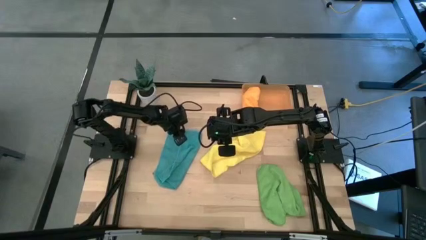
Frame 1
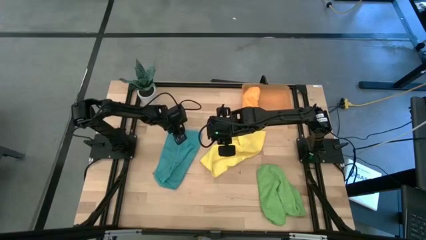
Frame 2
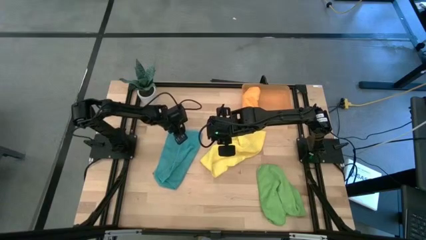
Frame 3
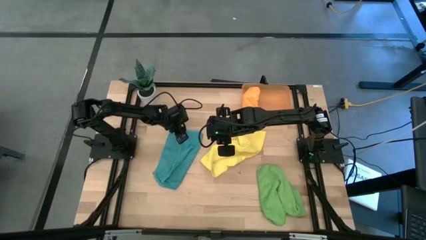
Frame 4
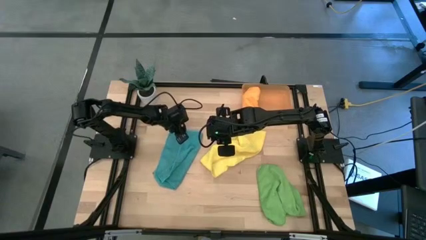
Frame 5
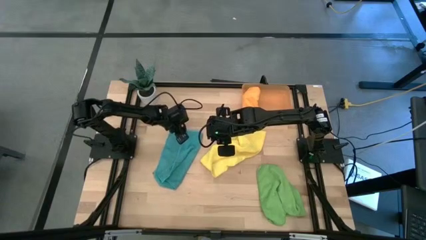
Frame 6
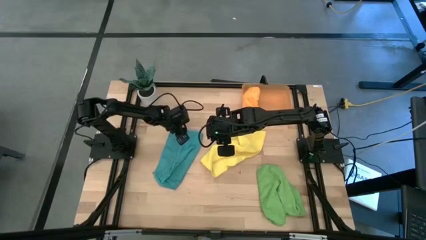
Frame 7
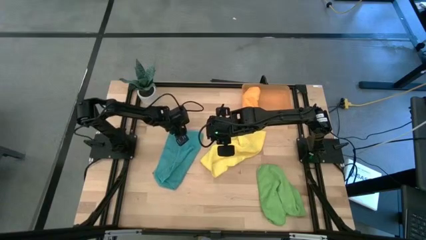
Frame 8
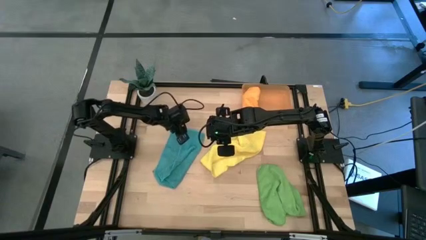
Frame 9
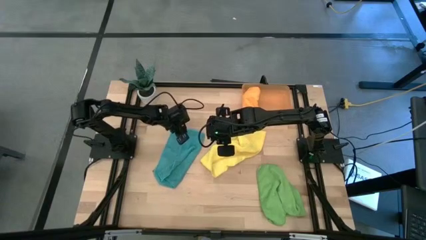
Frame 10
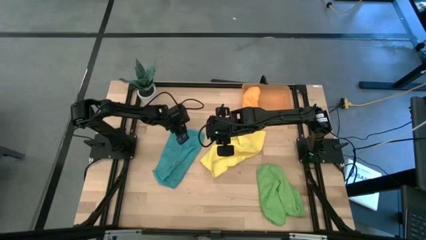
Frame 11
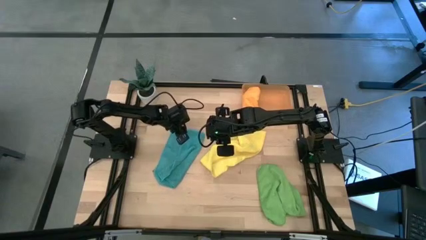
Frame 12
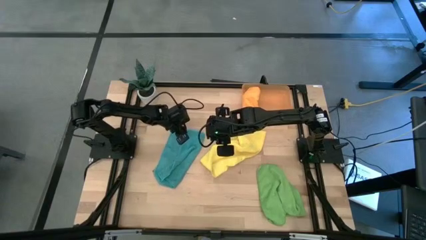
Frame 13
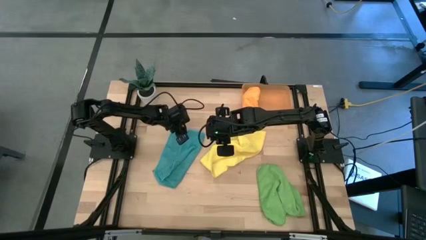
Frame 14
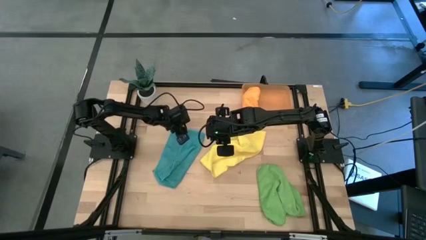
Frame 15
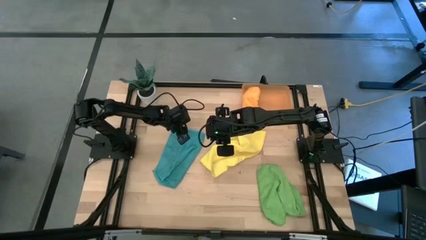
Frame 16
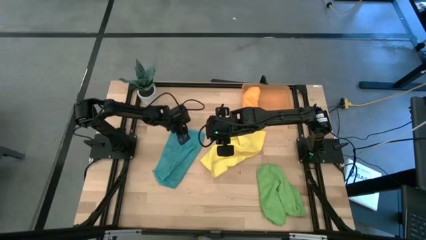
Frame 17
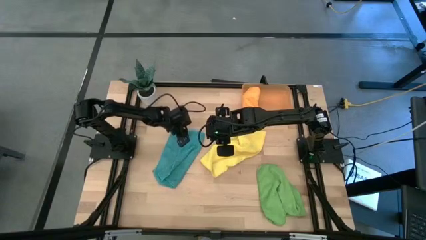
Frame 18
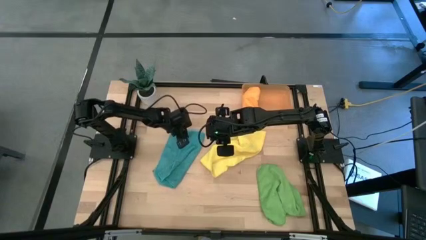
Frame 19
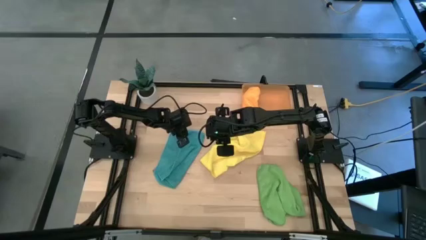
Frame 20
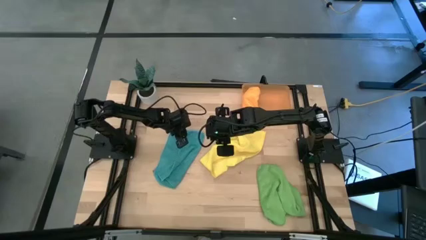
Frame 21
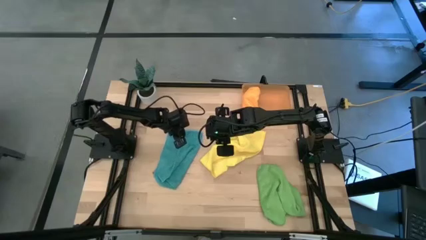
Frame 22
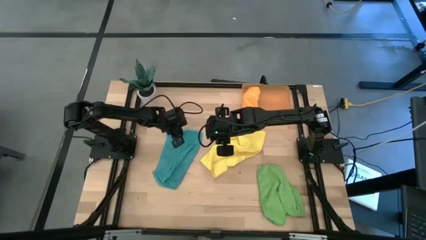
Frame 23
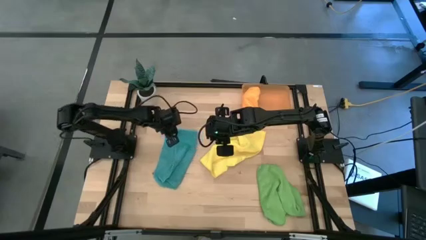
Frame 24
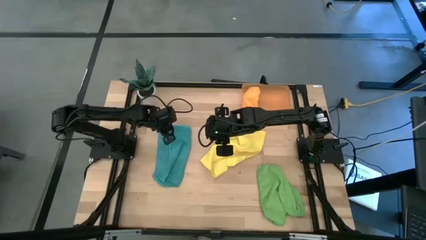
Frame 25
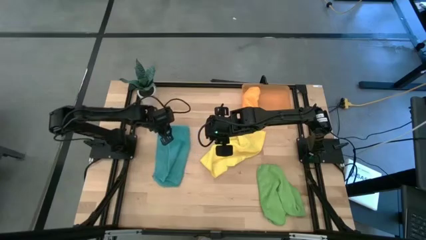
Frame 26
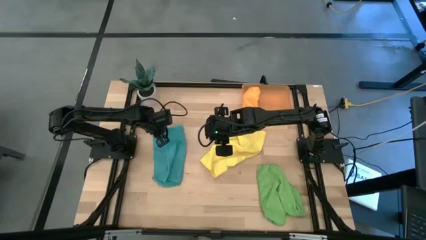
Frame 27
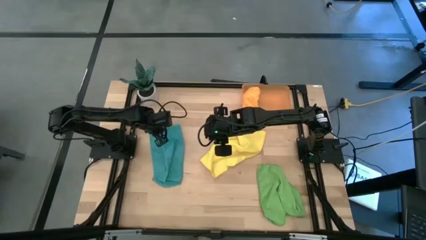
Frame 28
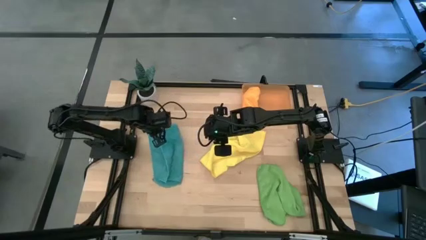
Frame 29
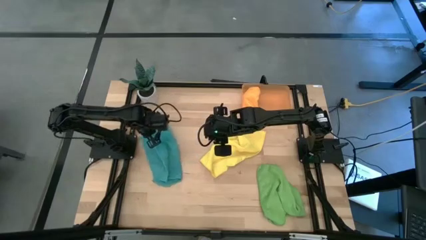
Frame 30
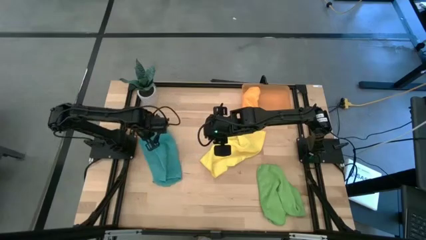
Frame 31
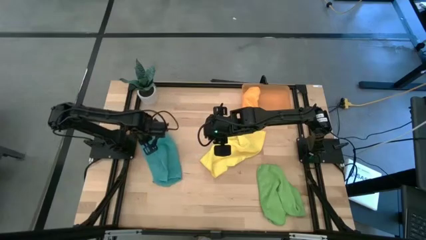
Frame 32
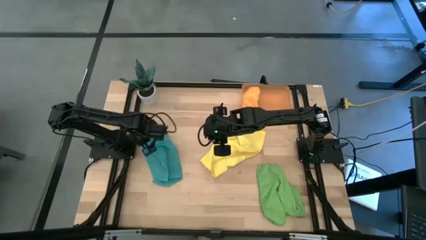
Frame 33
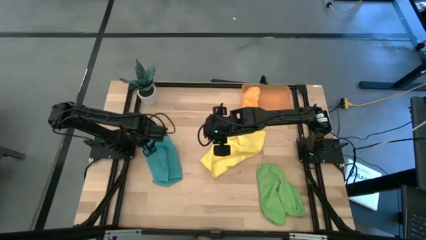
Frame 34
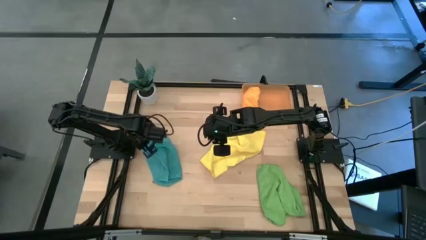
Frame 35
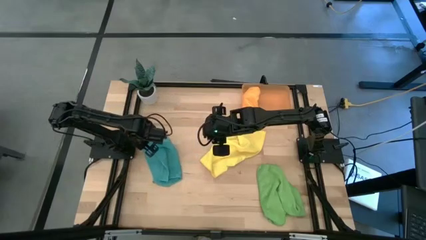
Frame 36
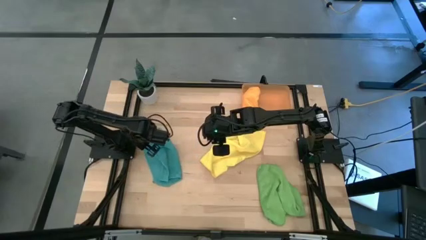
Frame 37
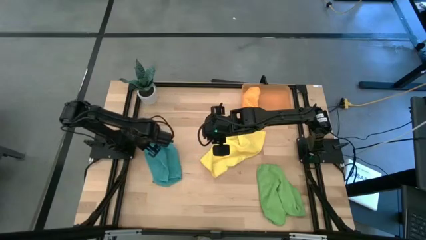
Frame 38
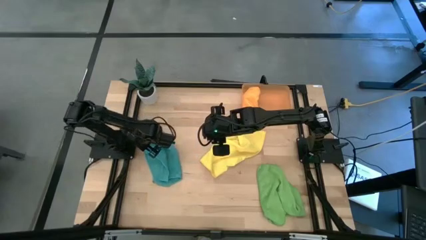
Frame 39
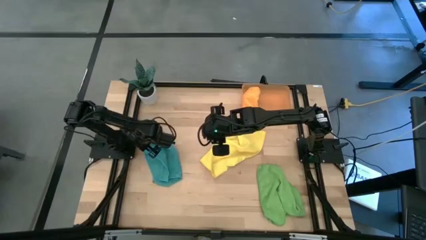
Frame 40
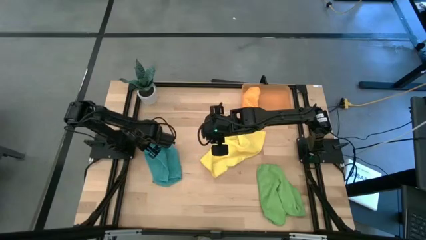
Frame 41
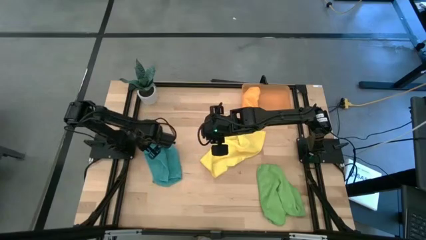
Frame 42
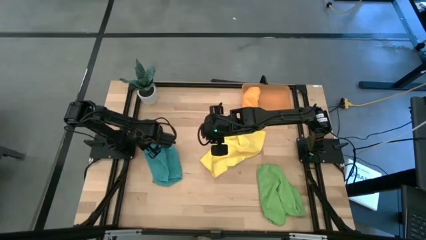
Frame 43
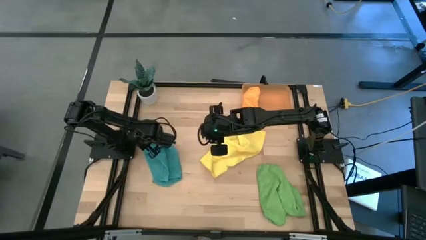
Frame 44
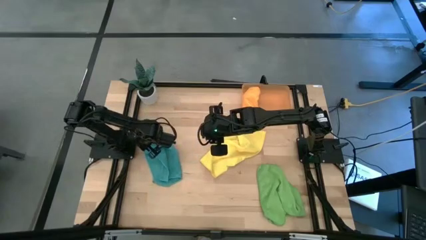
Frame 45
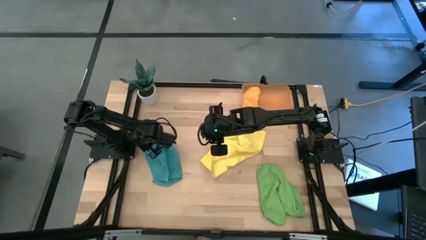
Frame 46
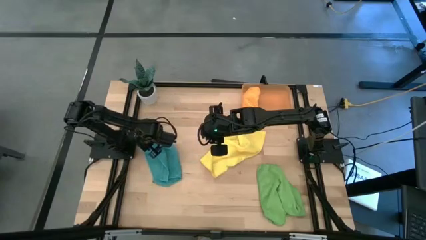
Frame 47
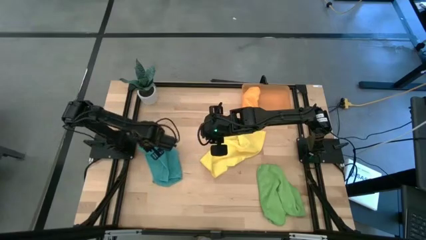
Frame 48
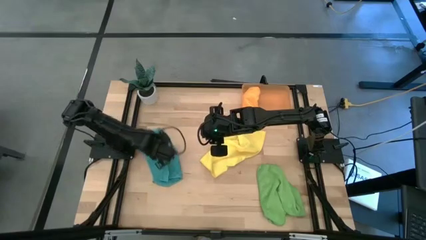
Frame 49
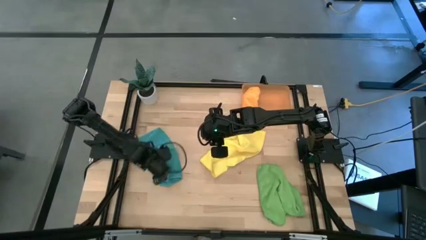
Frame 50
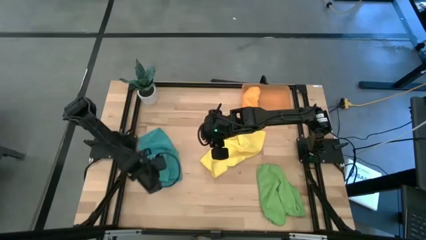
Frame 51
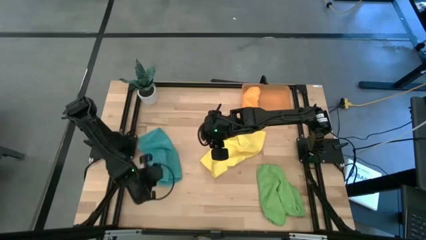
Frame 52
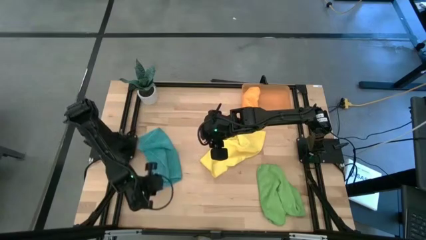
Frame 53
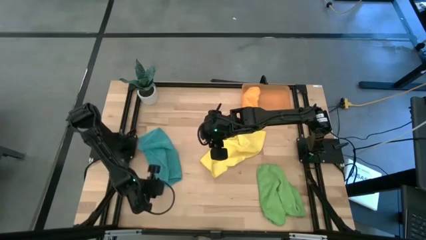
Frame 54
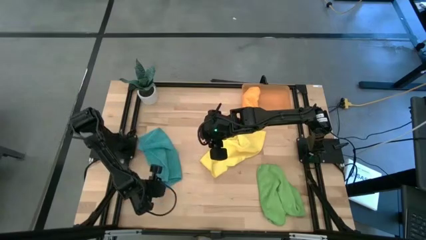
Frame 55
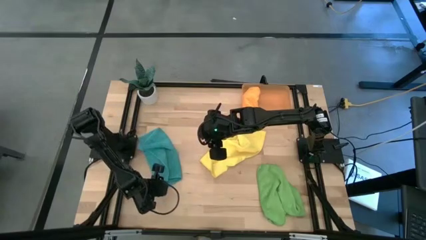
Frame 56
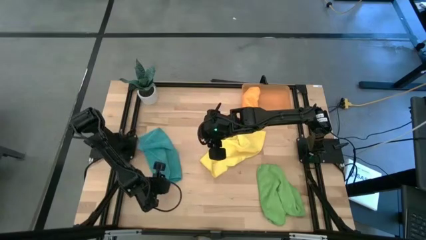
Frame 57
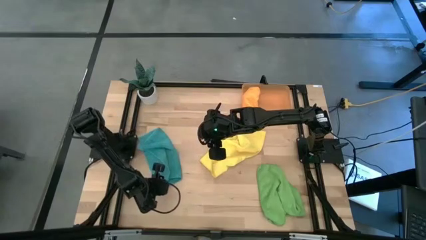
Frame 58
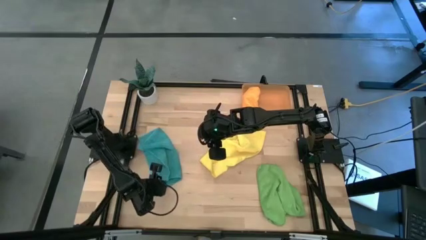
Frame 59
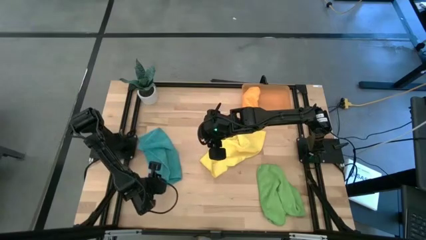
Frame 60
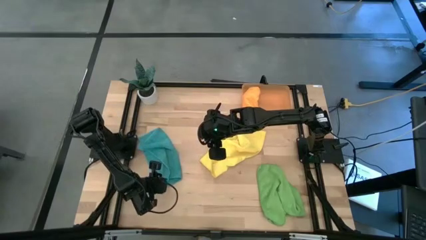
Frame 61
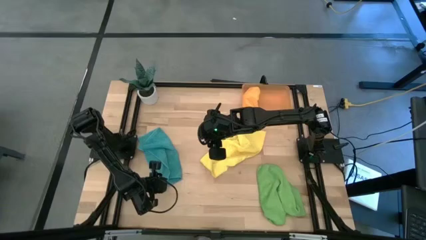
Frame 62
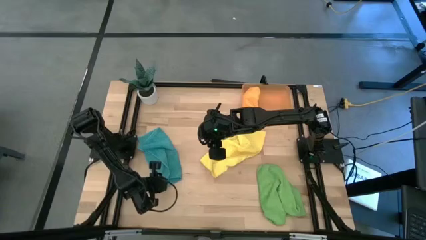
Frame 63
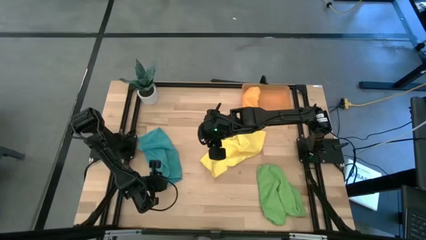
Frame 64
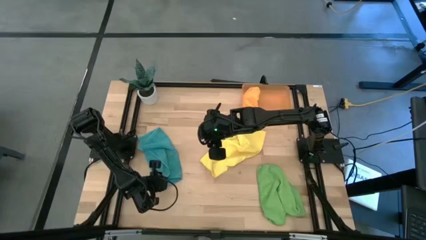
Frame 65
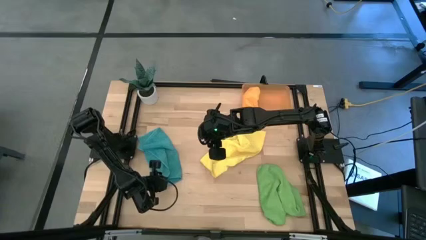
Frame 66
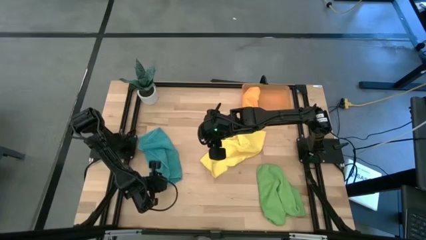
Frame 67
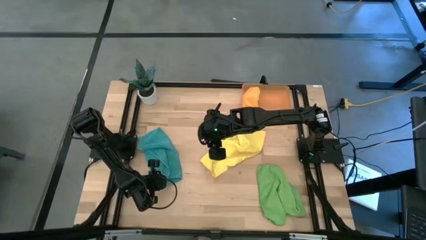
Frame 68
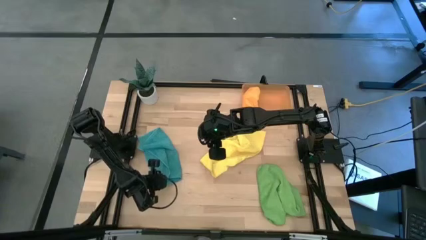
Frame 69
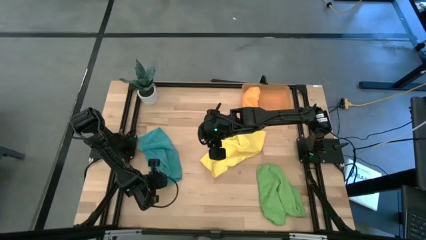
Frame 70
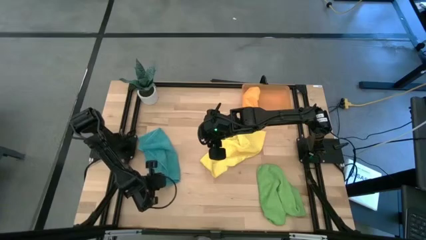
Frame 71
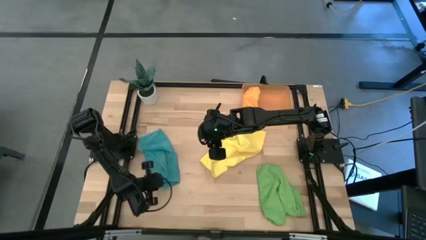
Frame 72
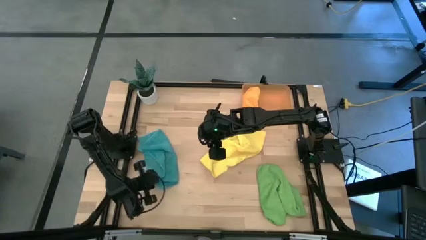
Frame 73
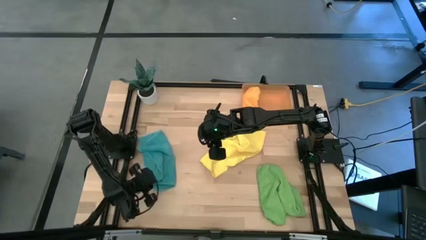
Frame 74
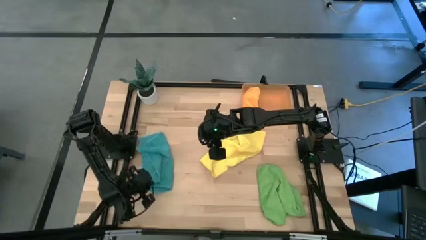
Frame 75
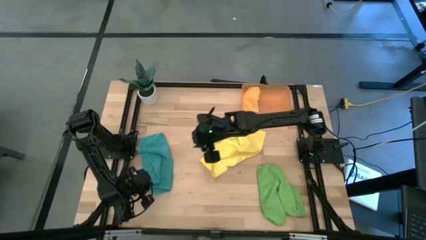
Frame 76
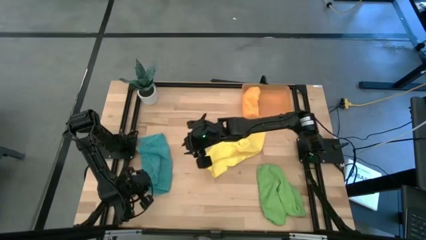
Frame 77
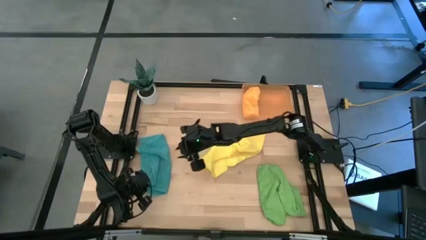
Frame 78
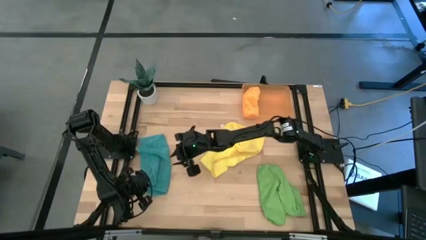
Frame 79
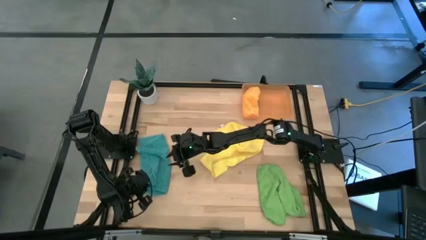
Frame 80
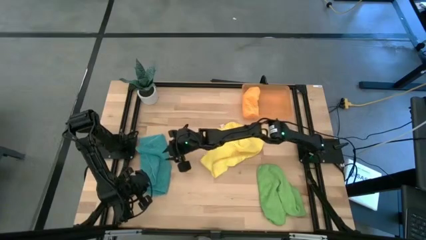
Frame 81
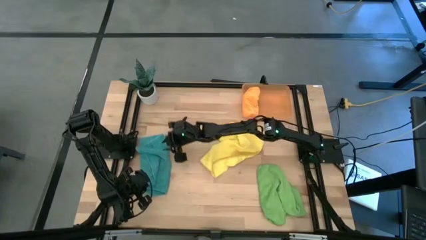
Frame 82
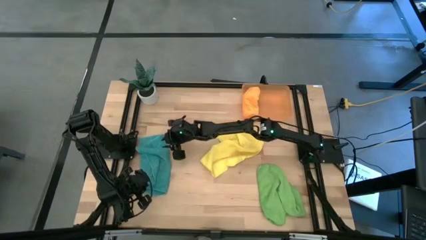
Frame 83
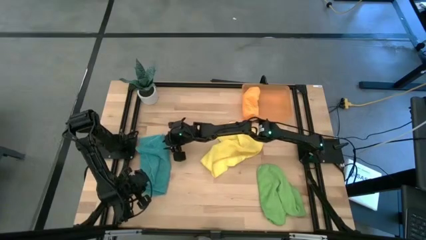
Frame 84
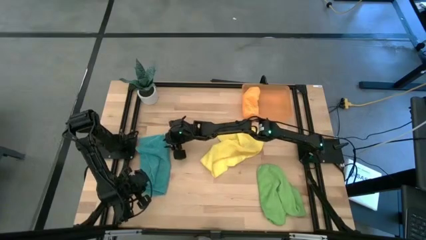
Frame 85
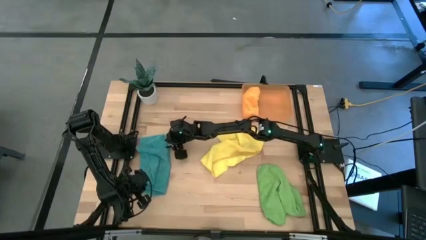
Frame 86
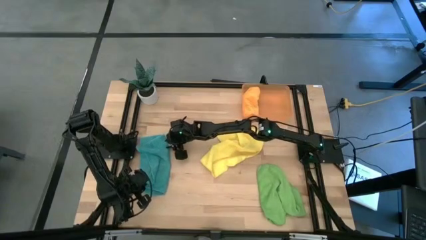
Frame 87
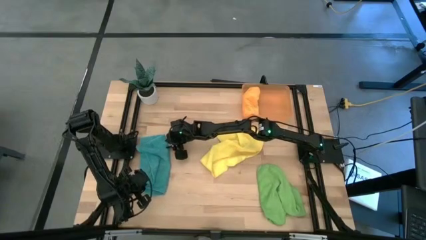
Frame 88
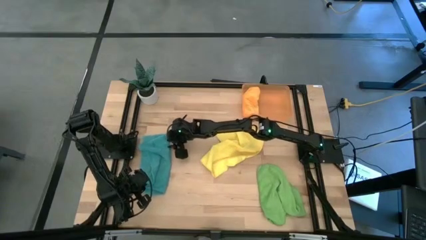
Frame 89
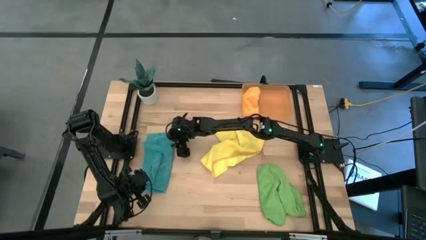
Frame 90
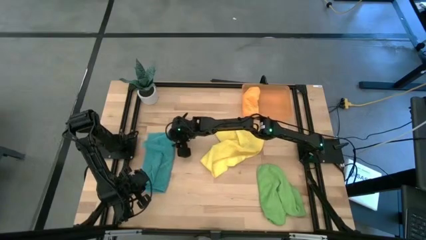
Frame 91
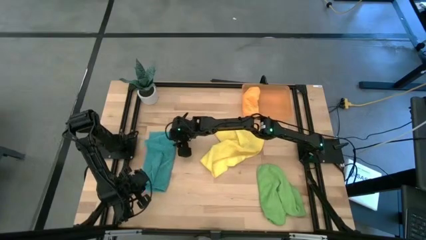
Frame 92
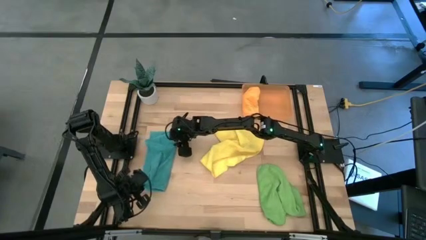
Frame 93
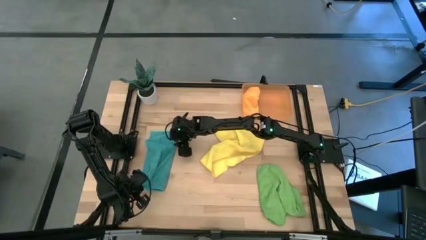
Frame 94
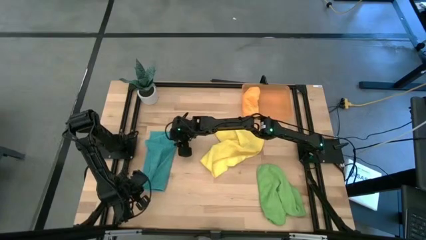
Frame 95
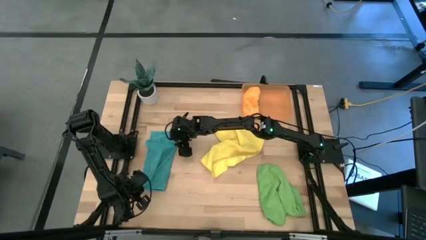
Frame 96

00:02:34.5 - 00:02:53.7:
Task: Roll microfiber towels into tight, uniform cylinder then place into a basket
Roll the blue microfiber towel
